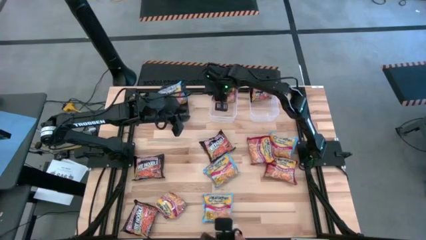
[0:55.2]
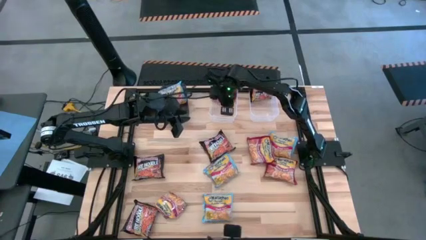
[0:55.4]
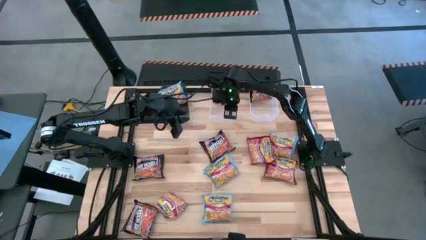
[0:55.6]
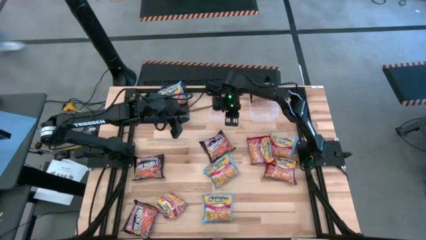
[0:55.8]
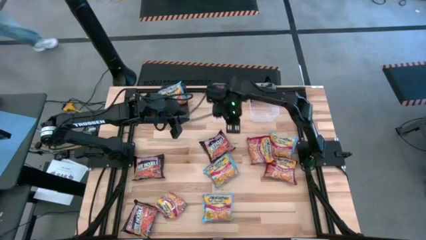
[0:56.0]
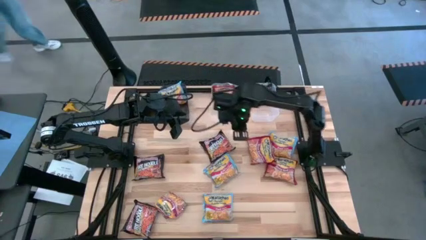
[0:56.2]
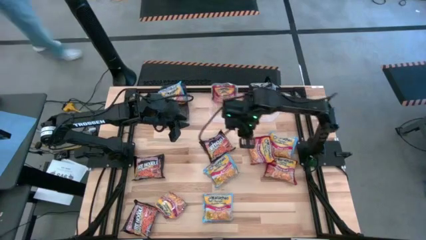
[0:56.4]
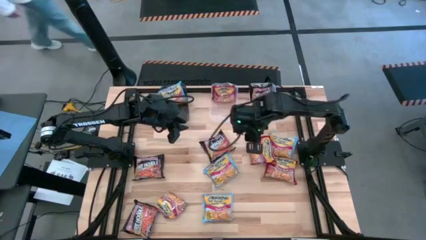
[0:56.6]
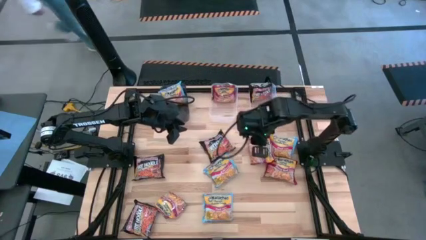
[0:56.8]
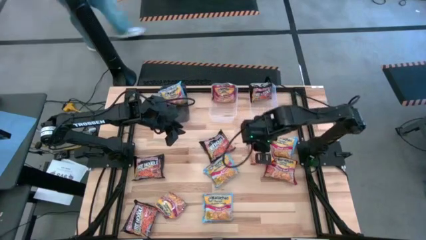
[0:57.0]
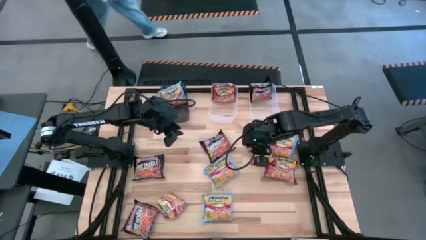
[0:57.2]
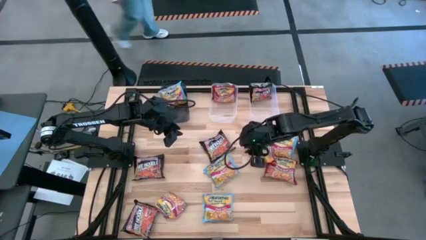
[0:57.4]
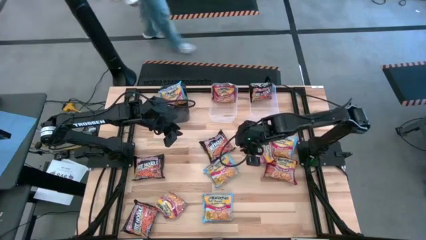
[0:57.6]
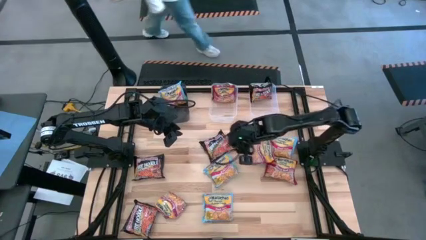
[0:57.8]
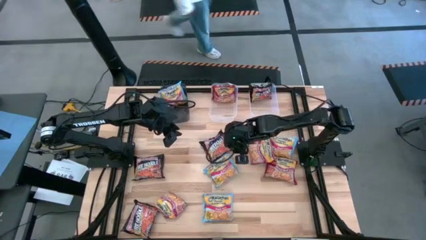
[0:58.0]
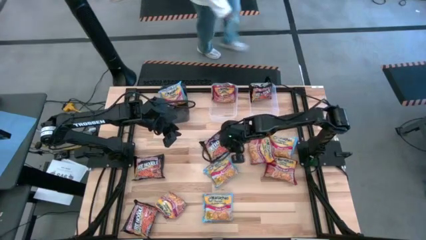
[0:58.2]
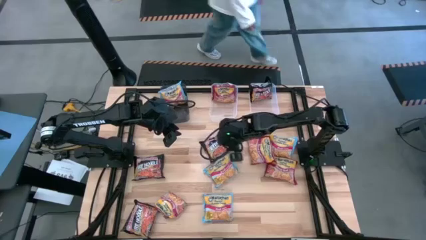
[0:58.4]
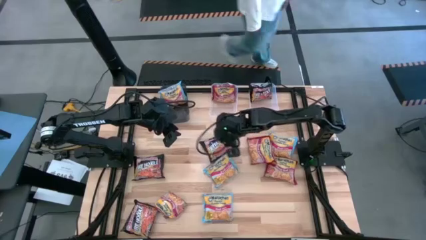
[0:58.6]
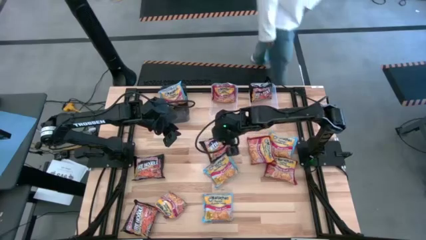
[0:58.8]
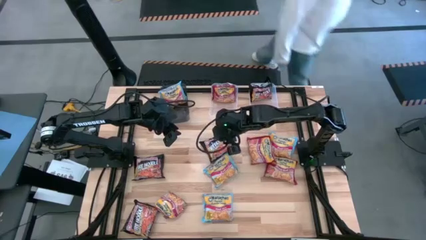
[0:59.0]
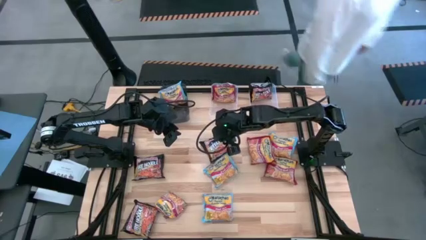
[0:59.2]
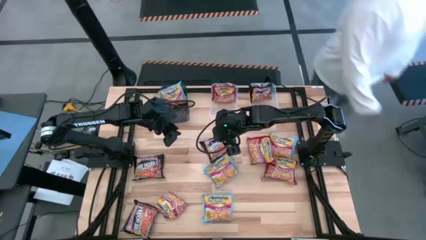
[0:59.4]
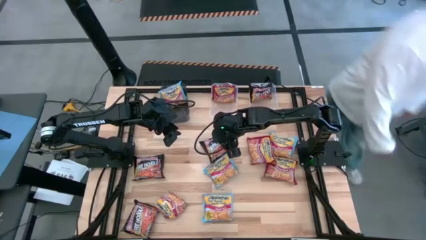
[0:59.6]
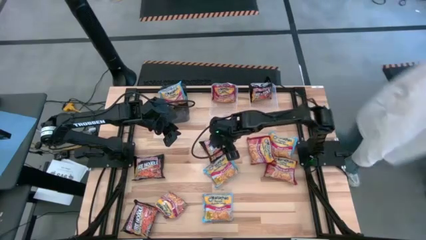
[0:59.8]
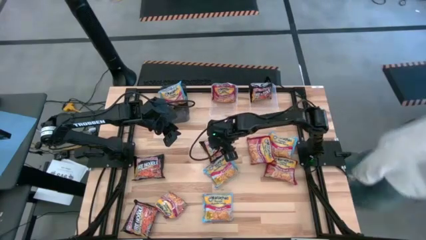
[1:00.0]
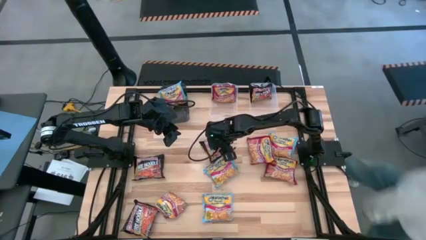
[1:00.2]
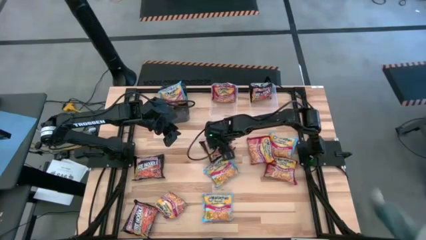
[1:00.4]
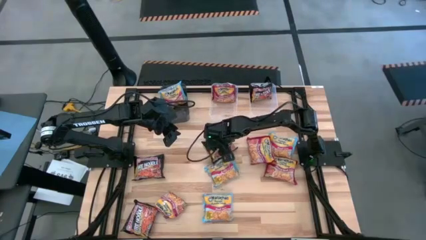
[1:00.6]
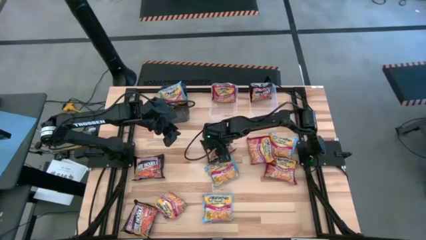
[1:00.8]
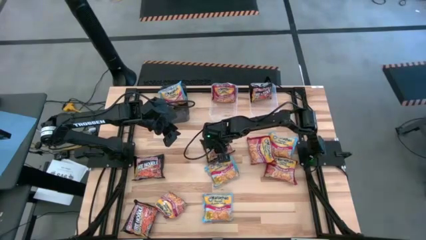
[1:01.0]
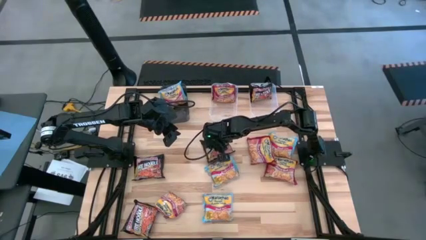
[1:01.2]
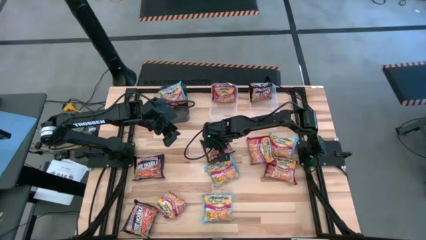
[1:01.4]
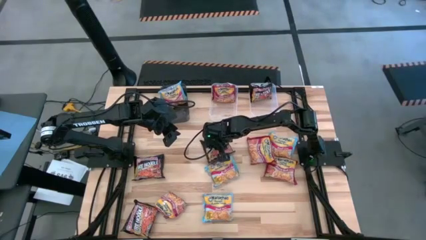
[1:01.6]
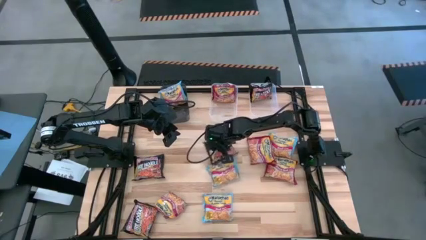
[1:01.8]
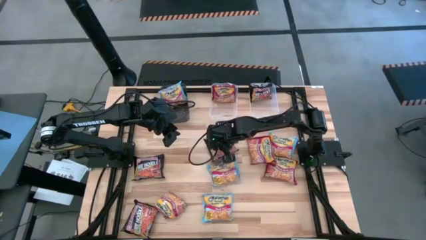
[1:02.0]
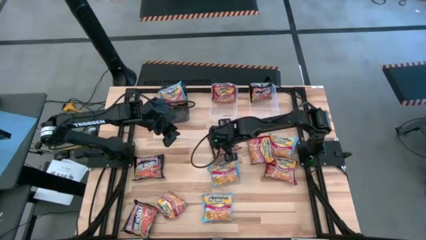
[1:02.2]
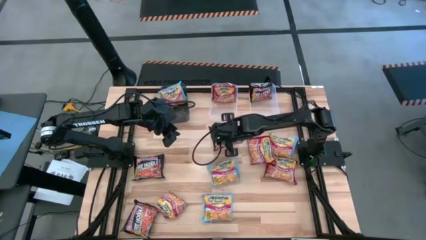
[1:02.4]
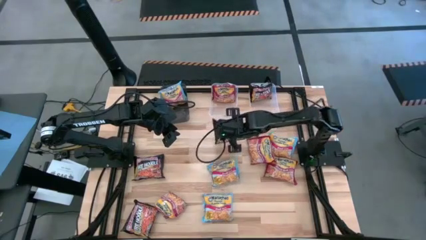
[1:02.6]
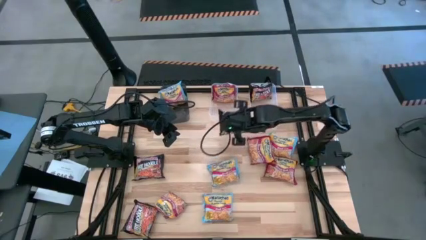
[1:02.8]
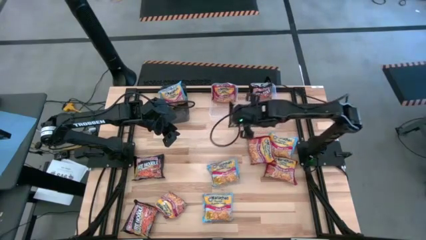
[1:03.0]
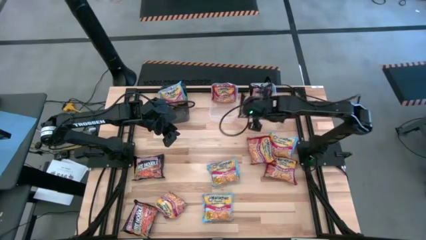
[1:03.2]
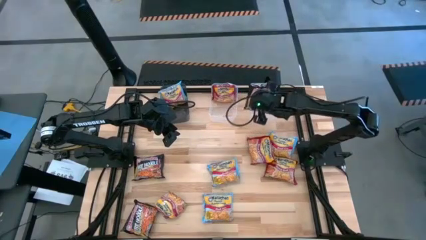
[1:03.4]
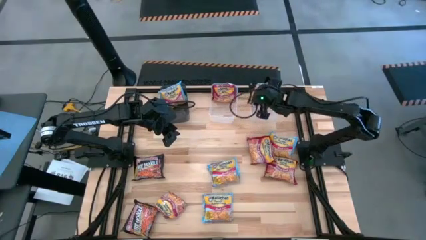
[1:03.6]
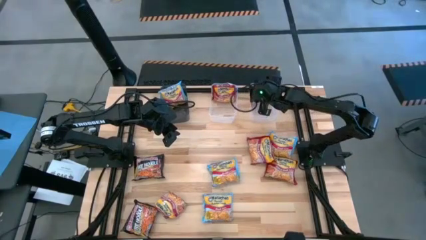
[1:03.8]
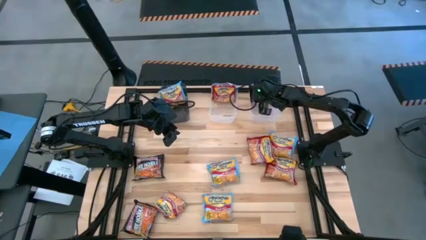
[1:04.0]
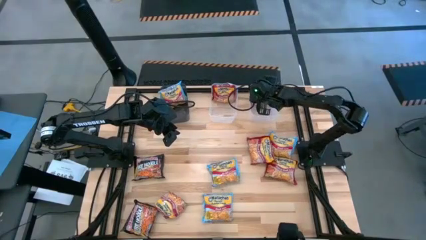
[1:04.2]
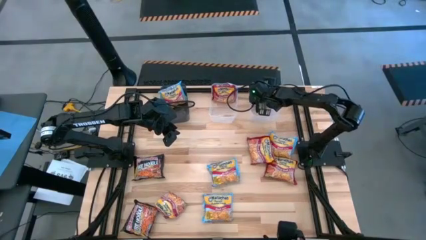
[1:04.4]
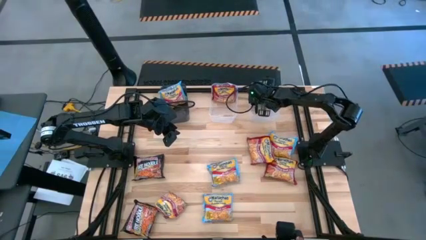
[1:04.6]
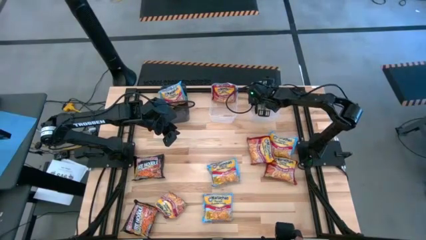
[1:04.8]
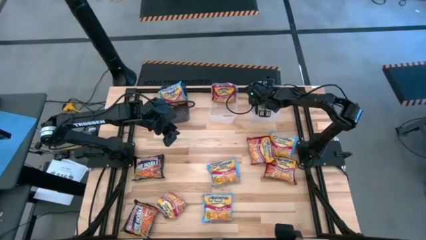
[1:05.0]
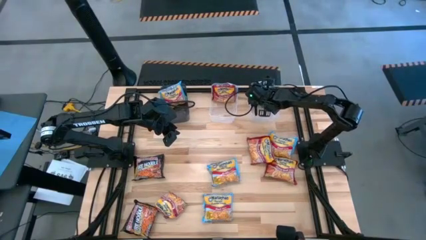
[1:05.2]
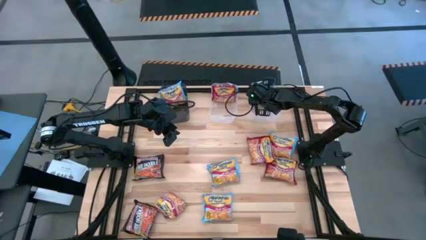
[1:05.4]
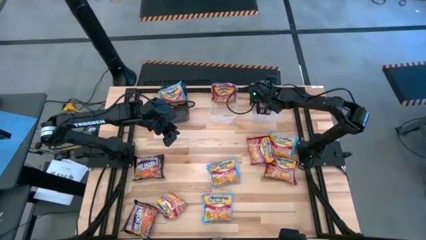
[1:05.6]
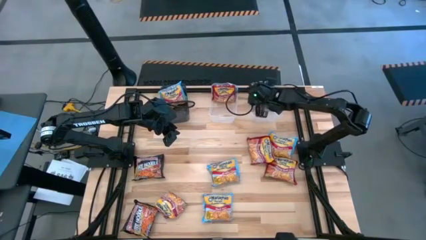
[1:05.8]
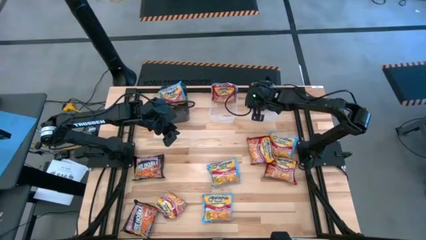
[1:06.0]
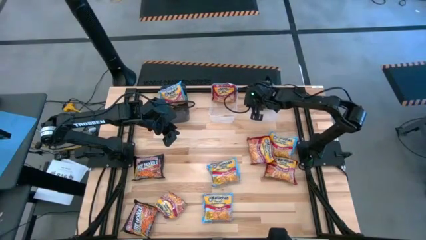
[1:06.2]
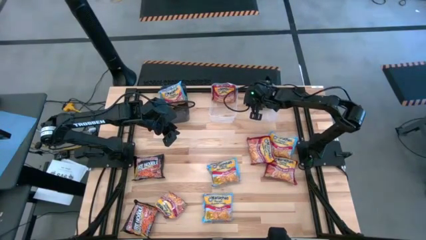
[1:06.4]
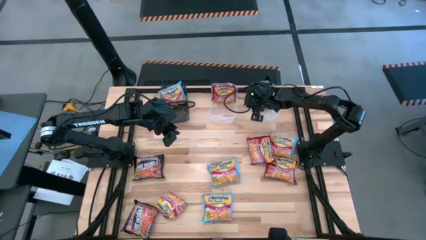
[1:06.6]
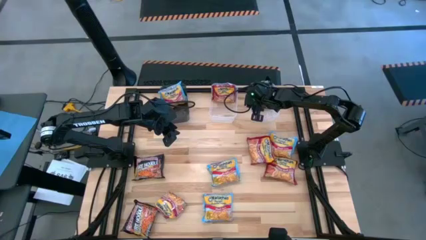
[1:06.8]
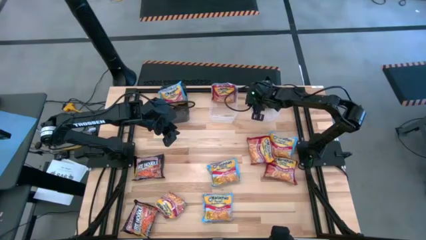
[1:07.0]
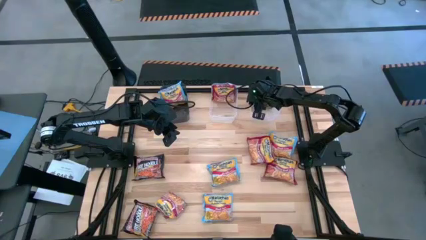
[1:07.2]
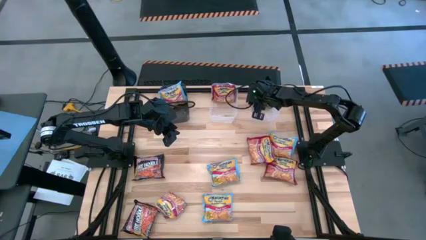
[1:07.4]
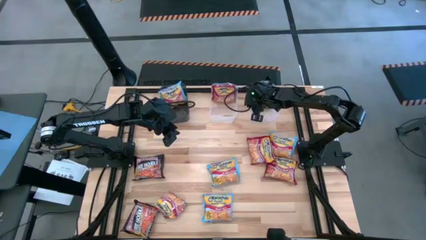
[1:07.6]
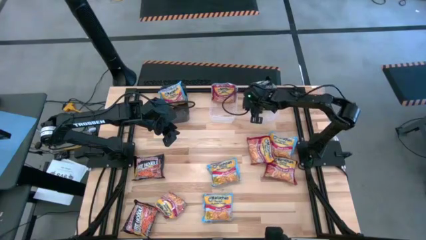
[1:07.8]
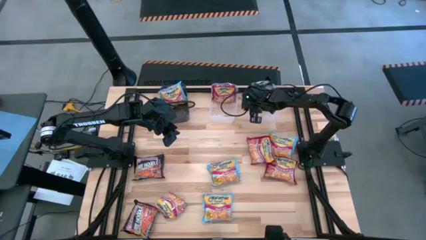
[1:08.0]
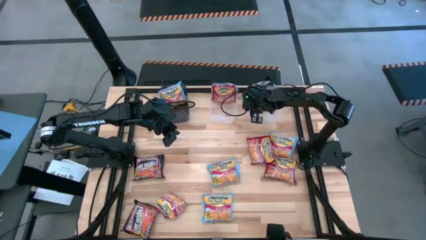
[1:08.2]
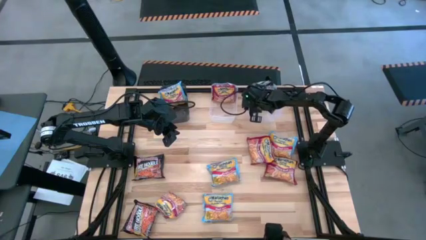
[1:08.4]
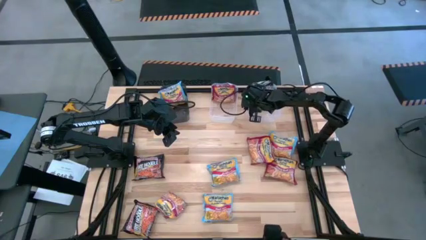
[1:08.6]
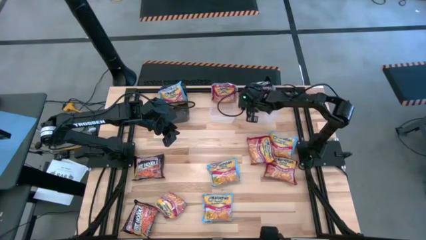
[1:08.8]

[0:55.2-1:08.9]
Task: Sort Maruchan noodles
Put the black noodle pack into the right transparent bin

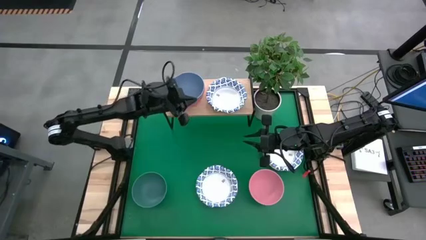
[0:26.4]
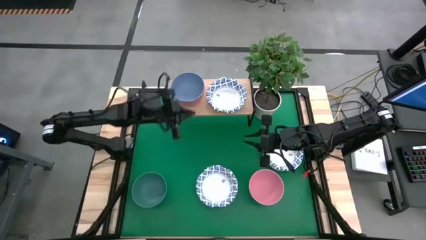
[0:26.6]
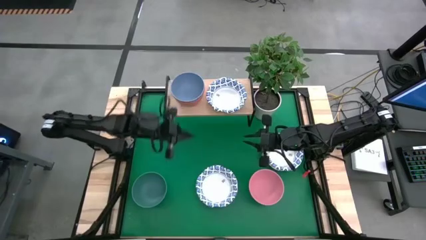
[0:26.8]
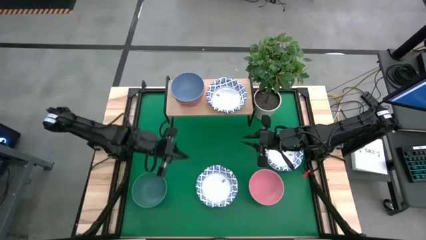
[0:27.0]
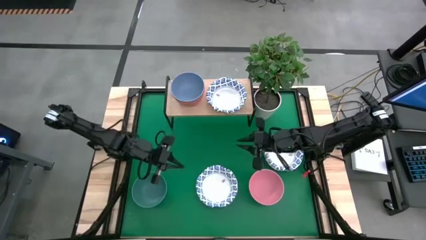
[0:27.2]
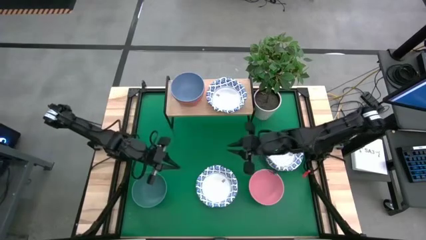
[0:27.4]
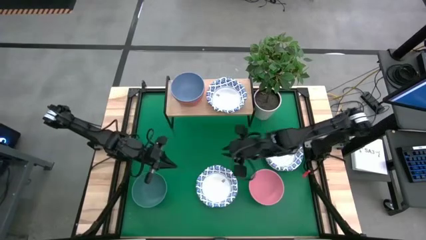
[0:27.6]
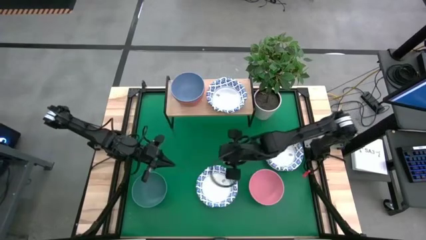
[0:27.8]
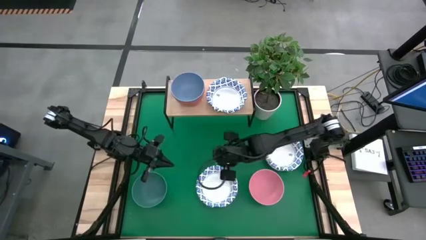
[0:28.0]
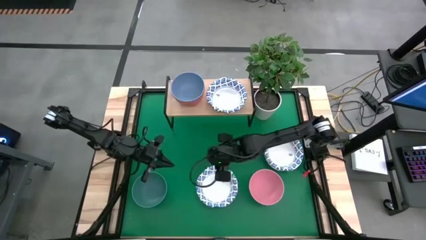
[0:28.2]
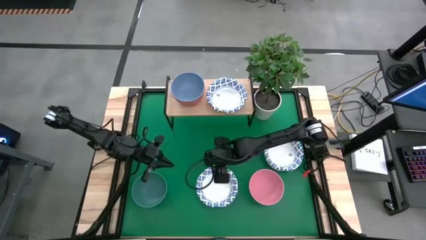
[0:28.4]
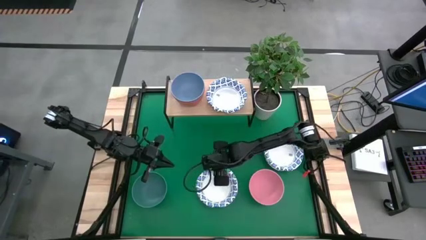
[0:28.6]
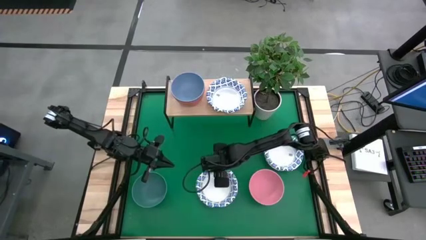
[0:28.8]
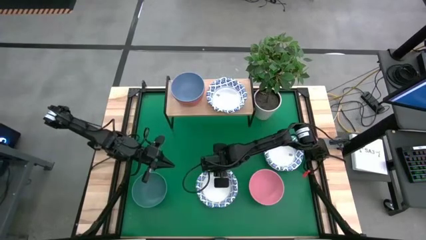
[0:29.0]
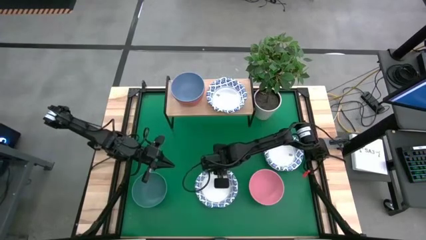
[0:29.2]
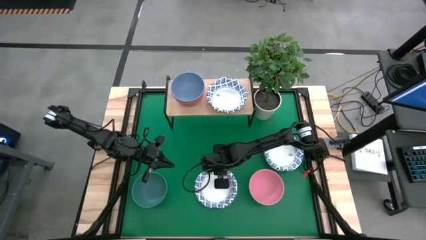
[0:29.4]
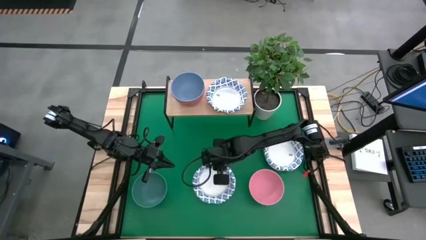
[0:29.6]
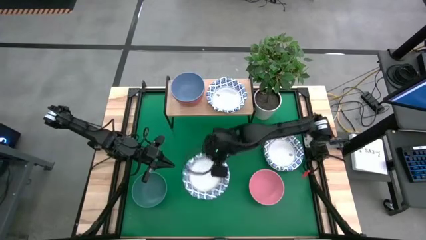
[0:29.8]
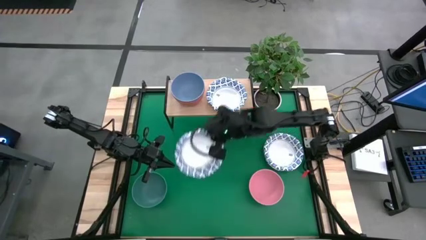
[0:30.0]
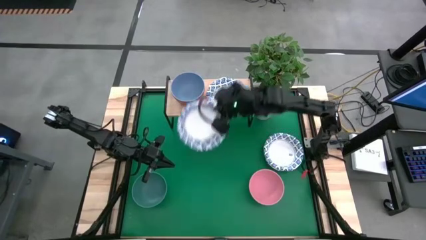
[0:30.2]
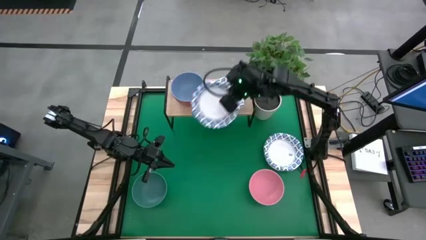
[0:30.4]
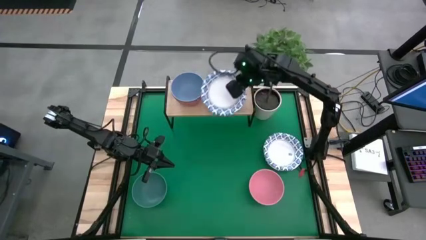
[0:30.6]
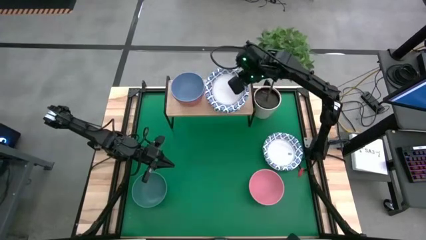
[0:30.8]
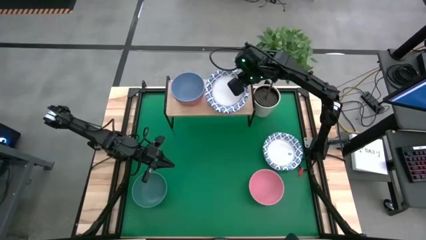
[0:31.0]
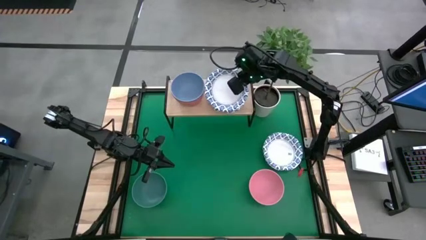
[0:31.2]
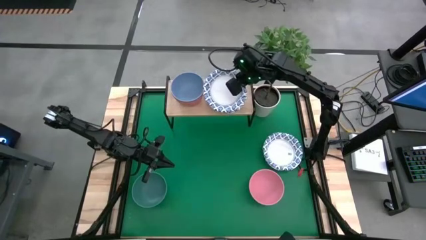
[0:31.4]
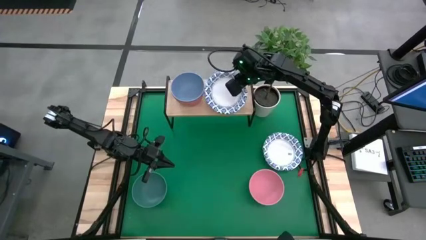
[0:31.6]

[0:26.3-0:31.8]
Task: Place and stack bowls onto a shelf
Stack the bottom white patterned bowl on top of the other white patterned bowl on the shelf
